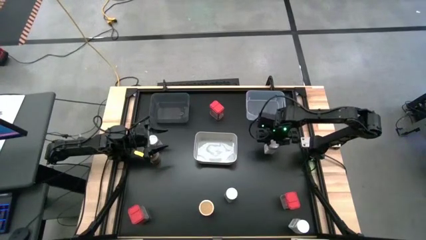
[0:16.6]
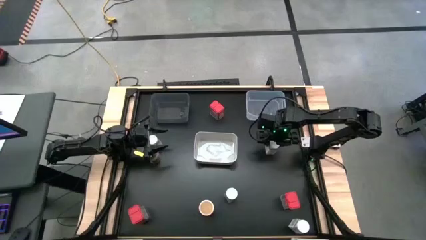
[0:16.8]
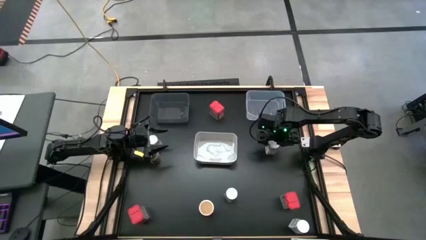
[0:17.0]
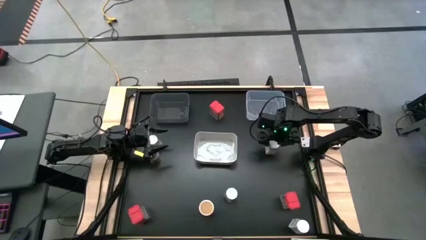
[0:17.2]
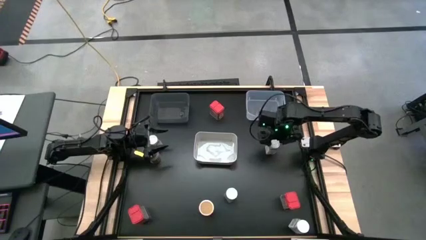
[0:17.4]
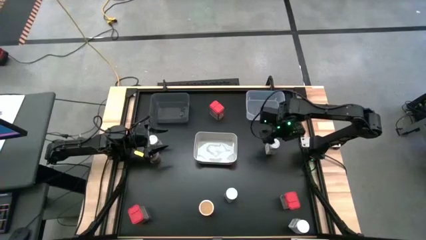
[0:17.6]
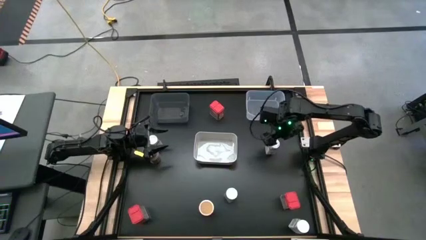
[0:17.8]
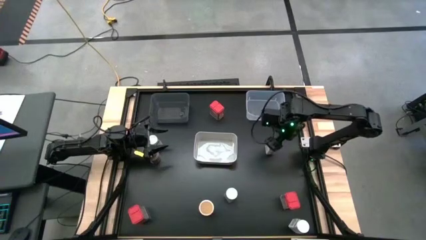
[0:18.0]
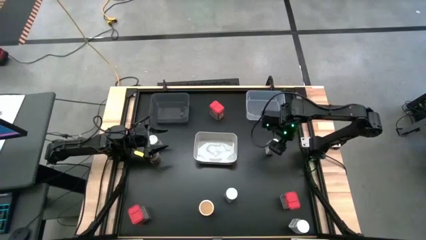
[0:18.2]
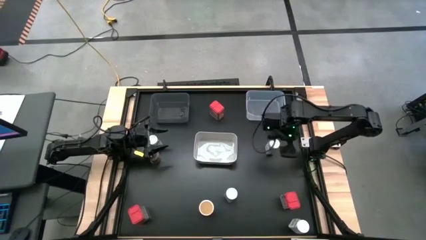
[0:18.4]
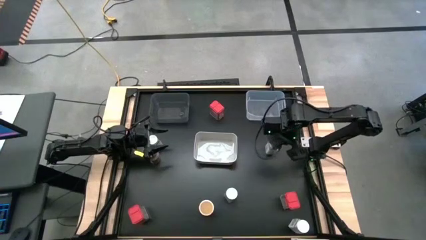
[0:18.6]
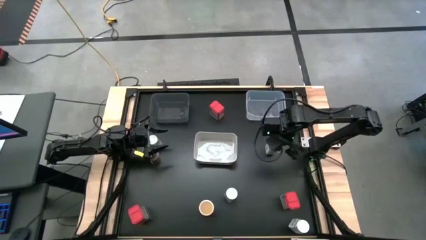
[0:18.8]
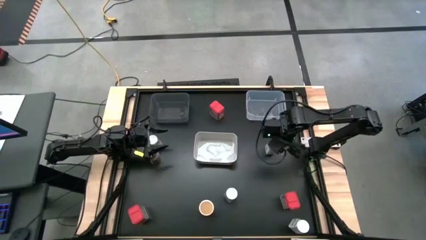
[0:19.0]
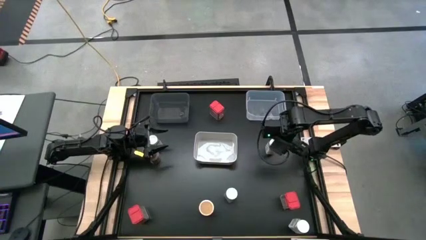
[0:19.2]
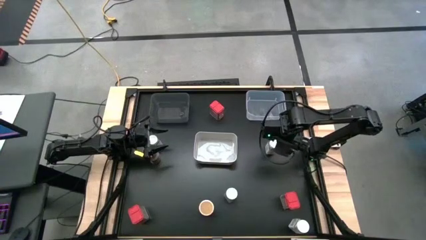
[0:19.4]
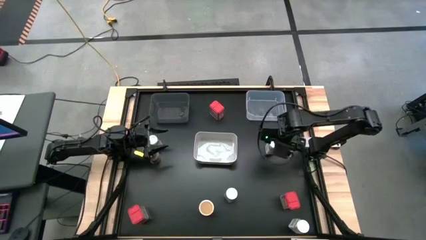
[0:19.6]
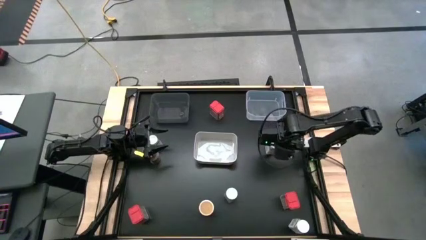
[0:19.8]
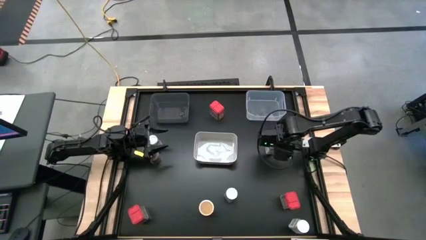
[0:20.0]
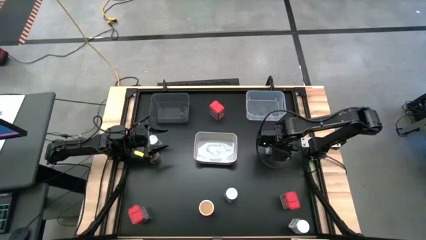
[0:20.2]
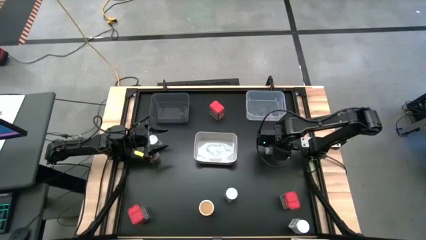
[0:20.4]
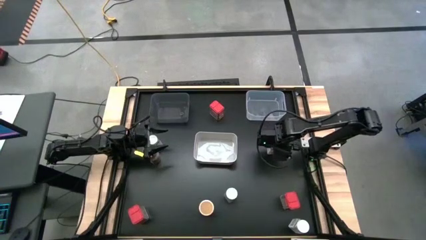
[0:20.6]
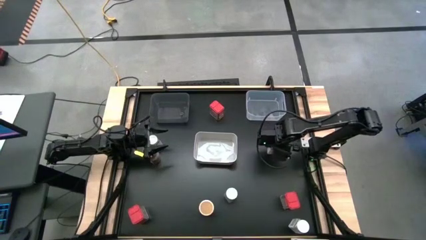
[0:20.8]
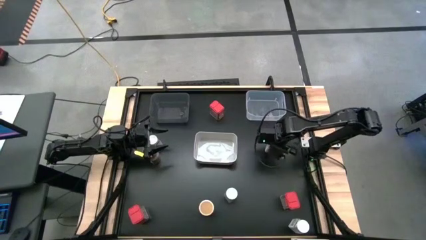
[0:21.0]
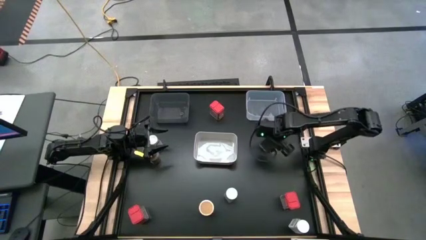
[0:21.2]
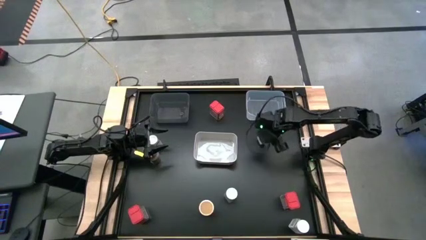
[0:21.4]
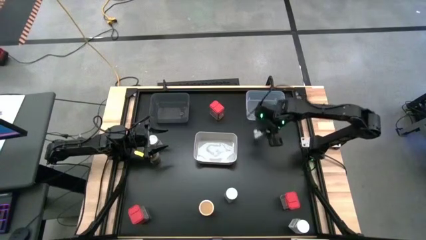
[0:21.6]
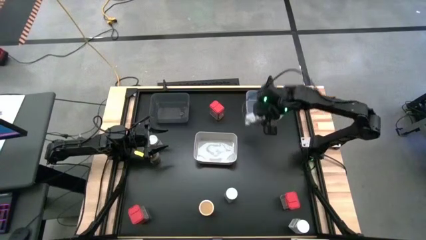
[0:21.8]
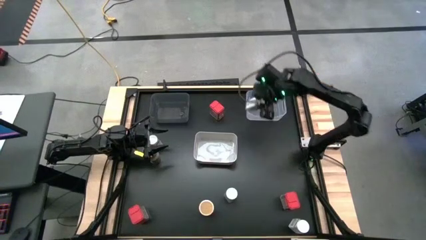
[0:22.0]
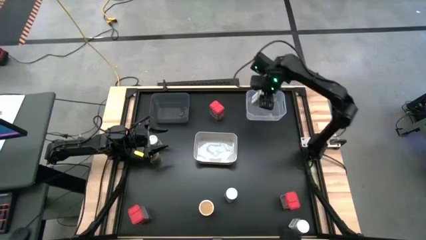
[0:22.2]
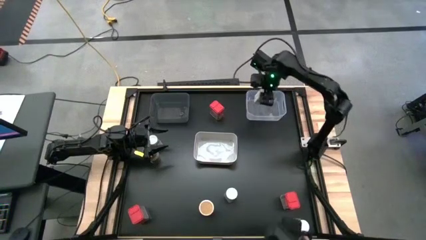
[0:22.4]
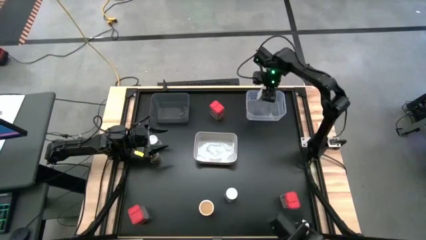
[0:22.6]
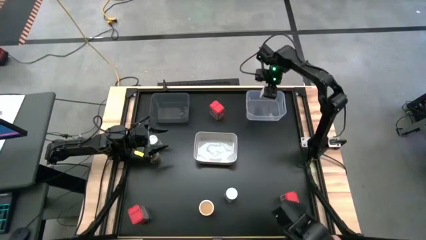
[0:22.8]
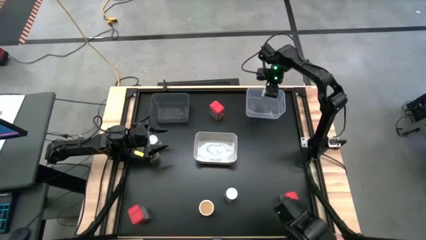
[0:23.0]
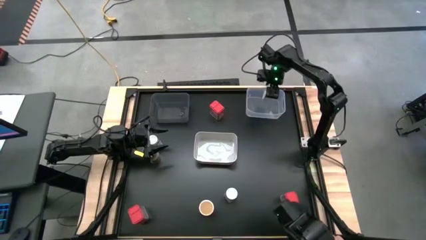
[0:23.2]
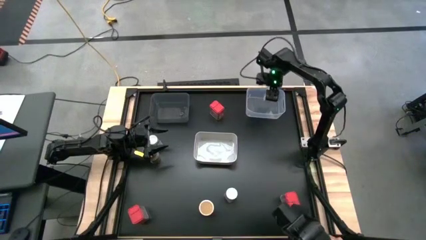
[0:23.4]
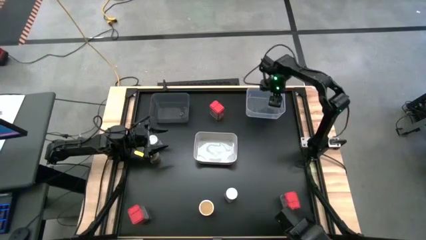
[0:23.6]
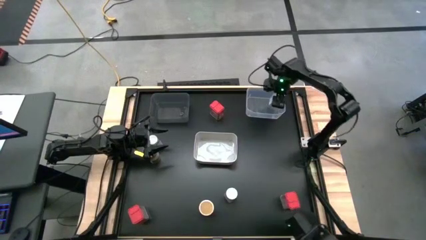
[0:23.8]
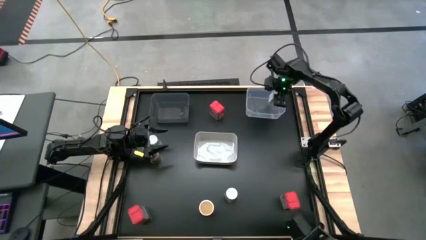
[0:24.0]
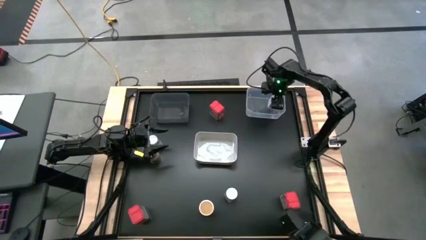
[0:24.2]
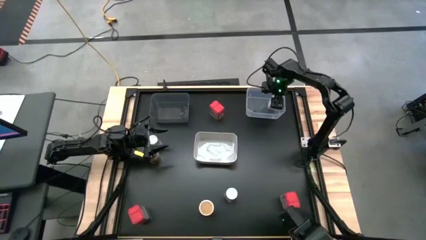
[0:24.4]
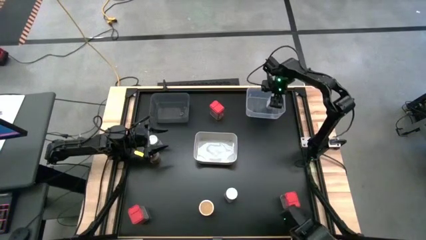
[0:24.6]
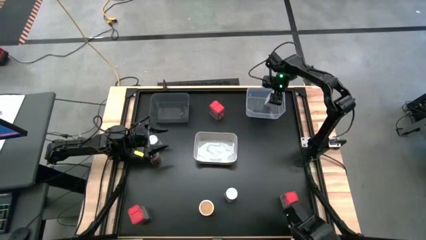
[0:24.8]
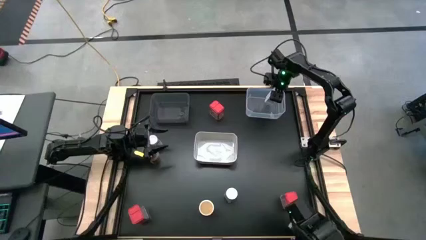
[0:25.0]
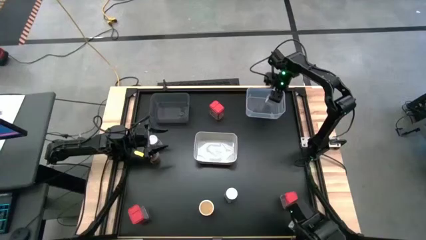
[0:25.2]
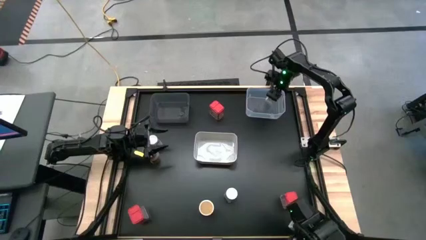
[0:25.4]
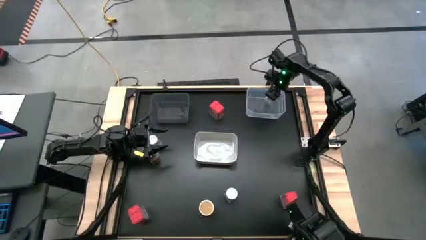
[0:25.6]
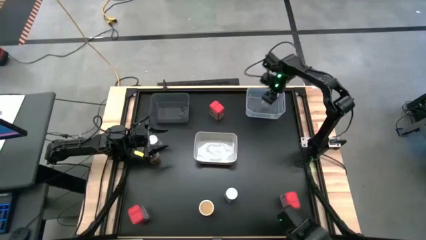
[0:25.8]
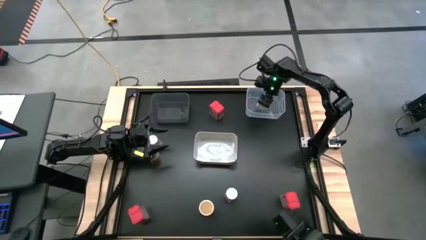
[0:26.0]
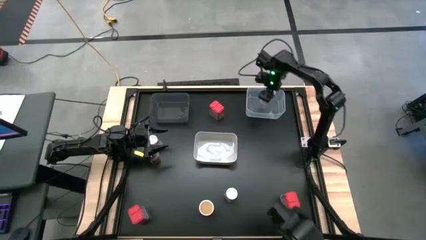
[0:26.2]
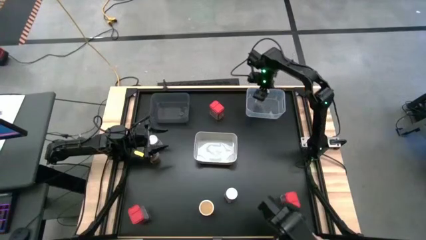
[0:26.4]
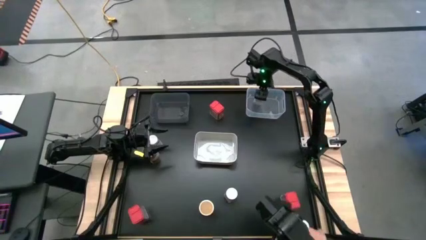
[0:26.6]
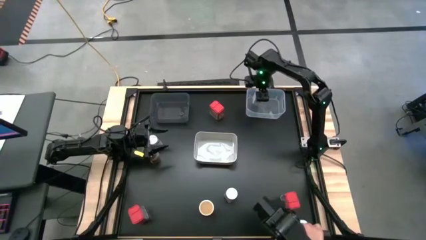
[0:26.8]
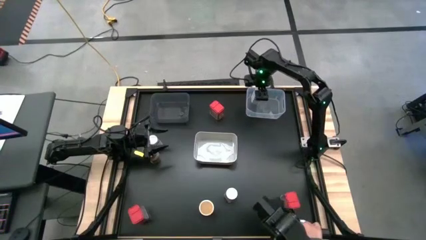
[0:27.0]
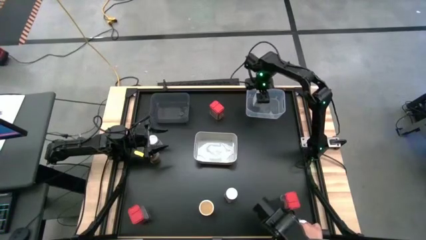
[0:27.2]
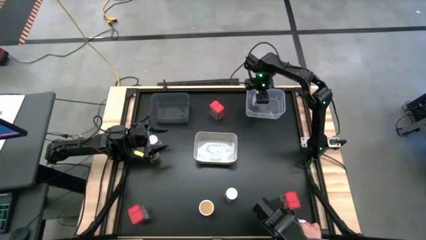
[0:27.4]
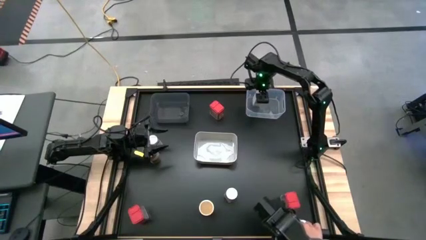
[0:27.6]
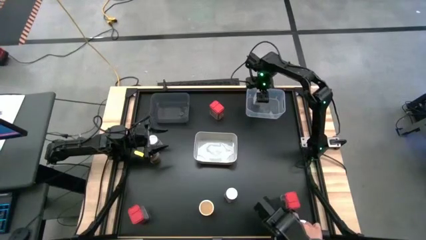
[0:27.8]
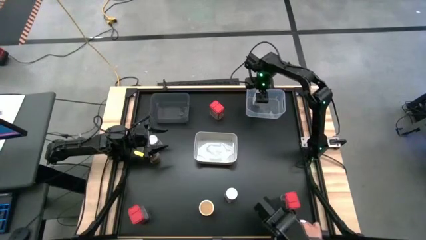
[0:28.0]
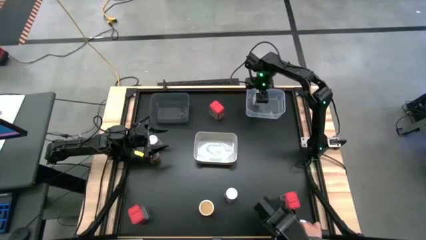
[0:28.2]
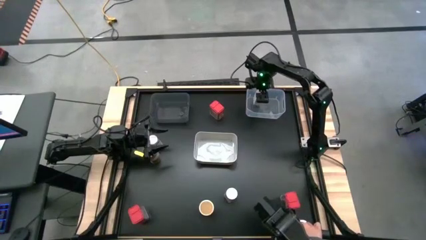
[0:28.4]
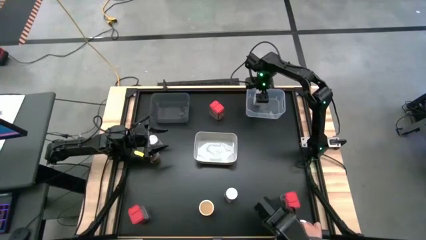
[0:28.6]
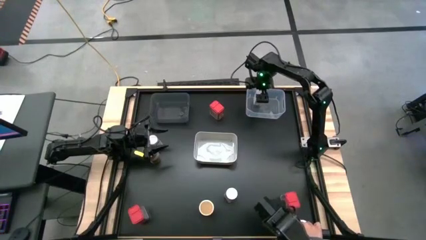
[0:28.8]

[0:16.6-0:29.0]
Task: Sort spices by type
Put the white seasoning bottle into the transparent bin

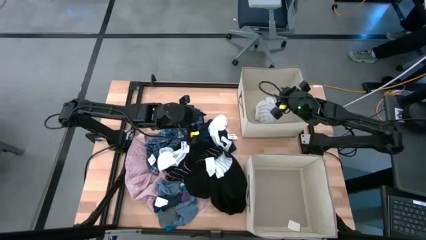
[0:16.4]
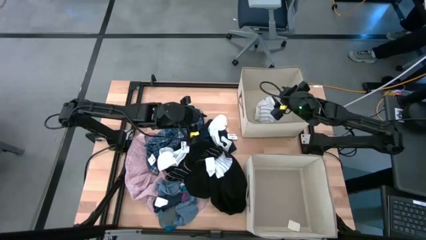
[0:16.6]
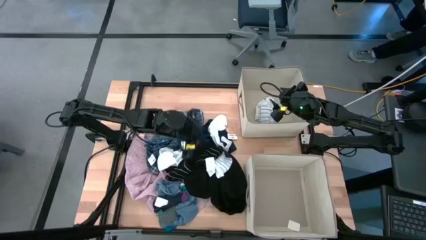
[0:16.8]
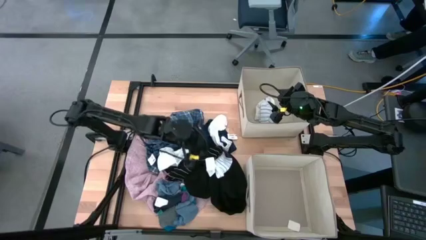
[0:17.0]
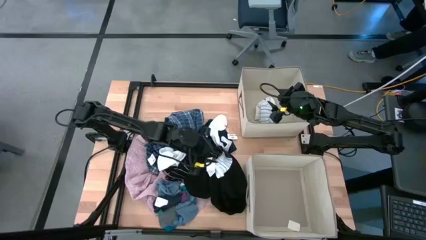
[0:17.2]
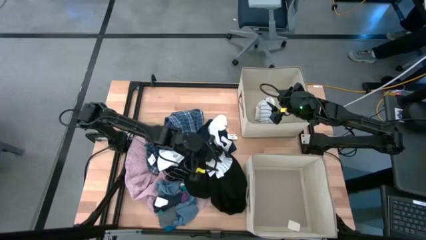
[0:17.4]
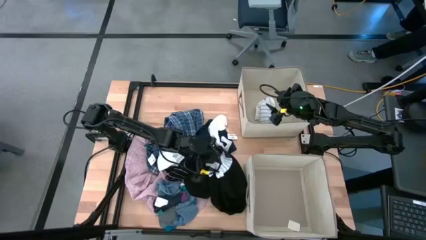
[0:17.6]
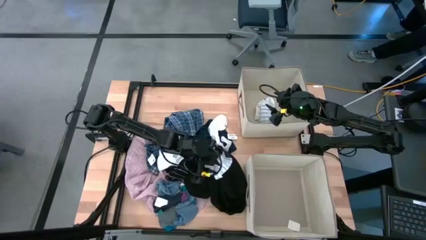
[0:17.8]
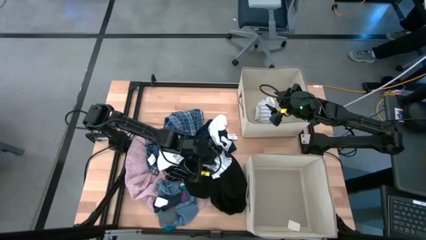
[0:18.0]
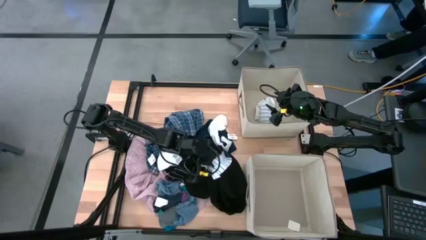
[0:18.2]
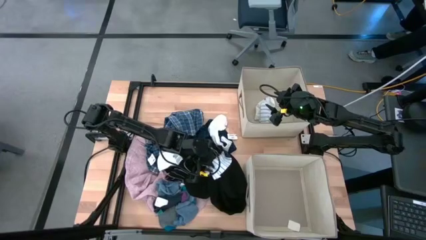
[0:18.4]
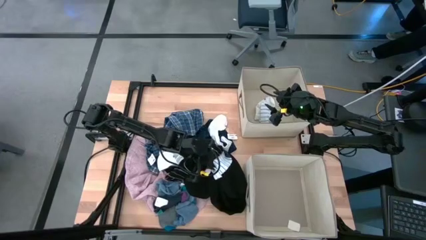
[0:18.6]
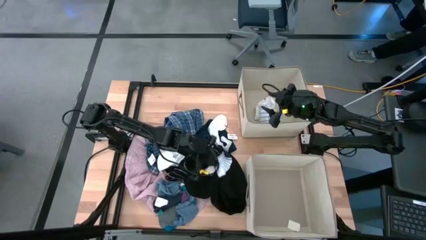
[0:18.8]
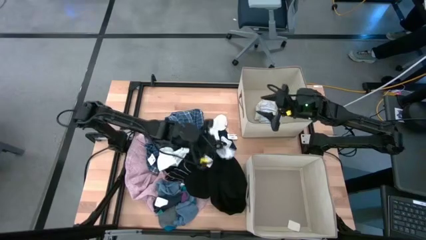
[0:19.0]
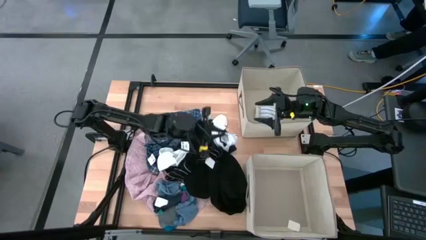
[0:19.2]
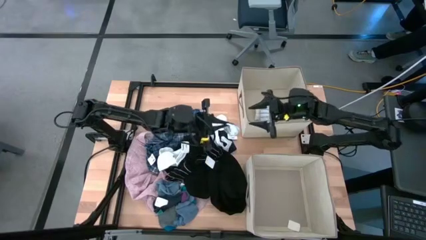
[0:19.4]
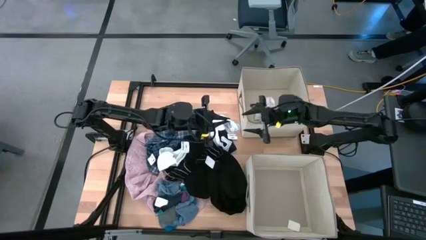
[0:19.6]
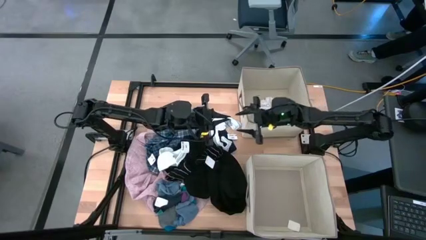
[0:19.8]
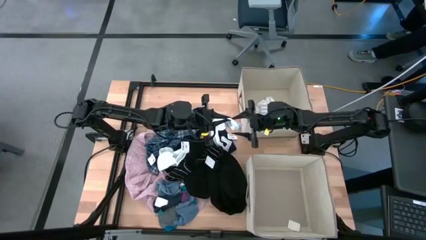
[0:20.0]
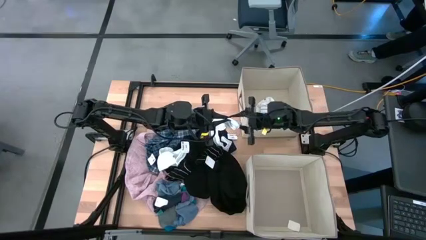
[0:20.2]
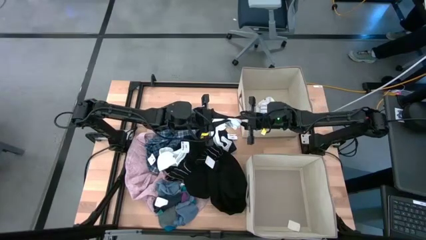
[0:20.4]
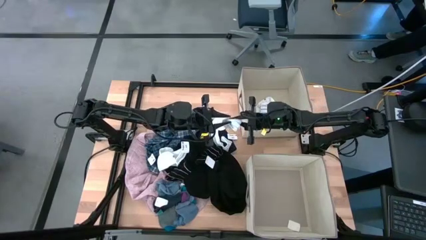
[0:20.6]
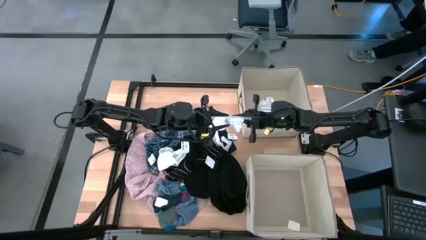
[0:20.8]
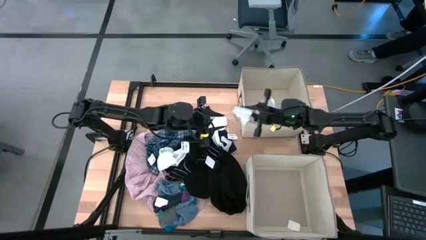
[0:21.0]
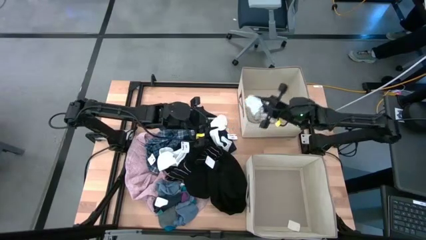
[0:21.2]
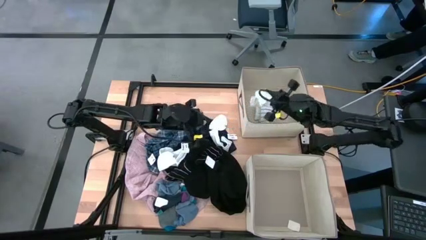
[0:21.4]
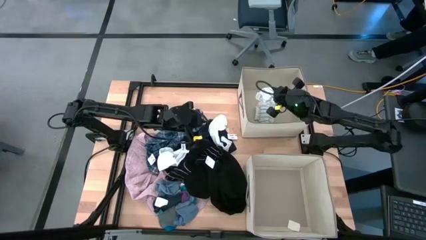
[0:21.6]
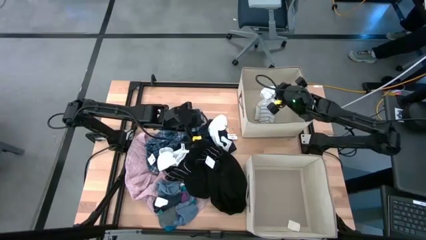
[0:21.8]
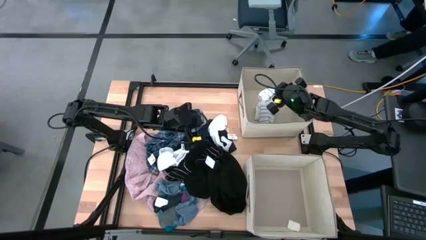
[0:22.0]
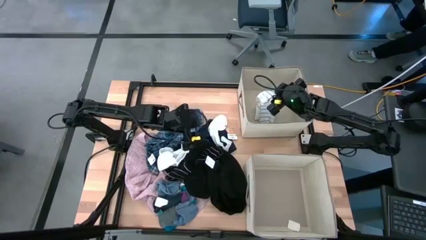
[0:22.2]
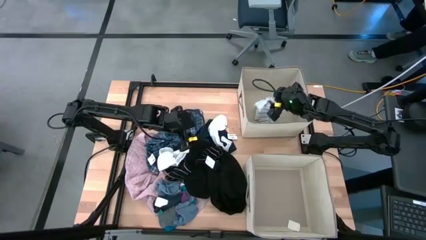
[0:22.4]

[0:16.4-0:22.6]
Task: Sort clothes
Put the striped white sock into the top laundry organizer
